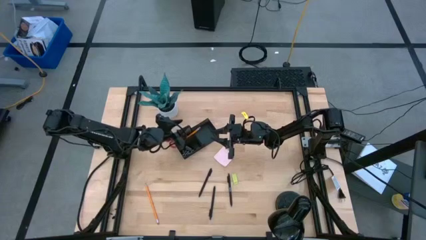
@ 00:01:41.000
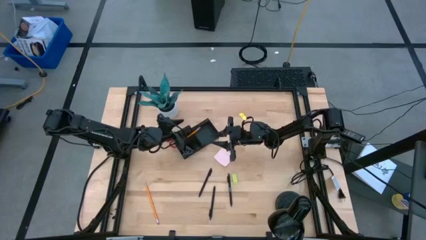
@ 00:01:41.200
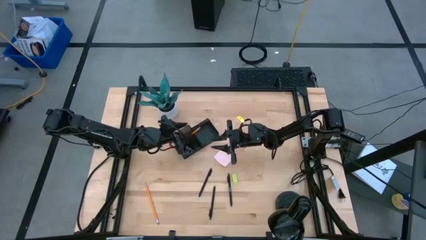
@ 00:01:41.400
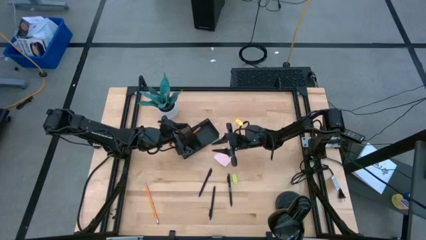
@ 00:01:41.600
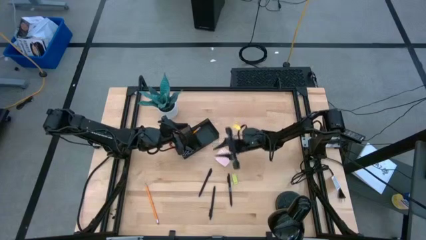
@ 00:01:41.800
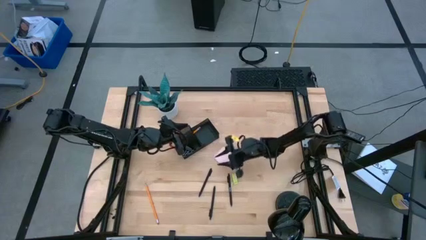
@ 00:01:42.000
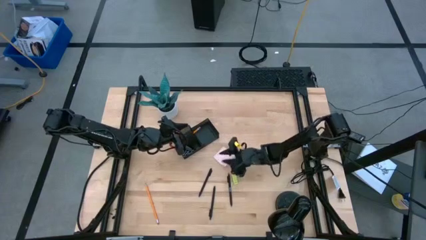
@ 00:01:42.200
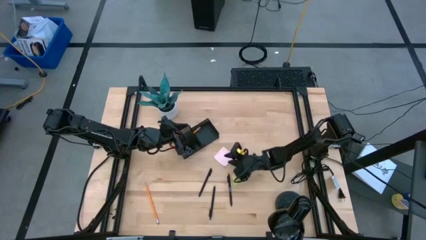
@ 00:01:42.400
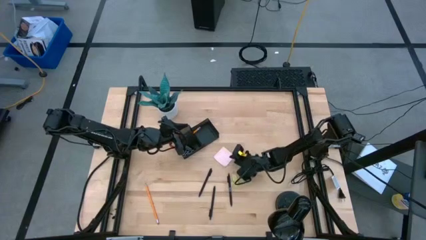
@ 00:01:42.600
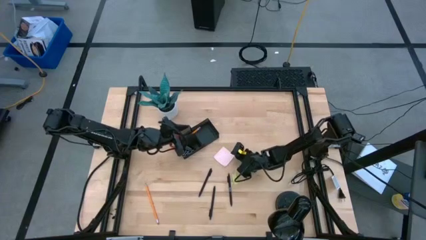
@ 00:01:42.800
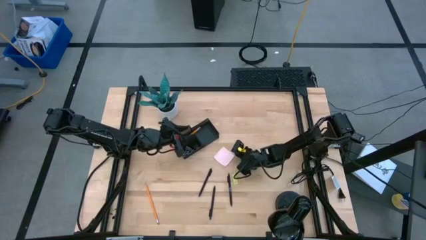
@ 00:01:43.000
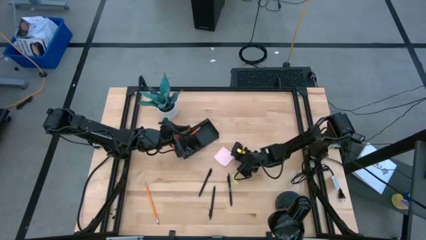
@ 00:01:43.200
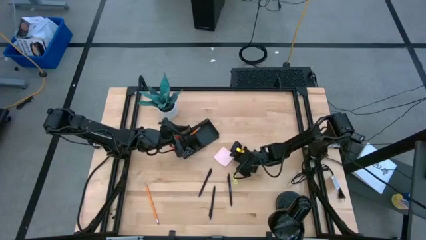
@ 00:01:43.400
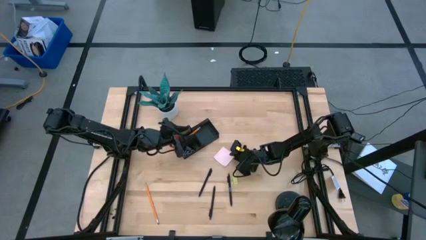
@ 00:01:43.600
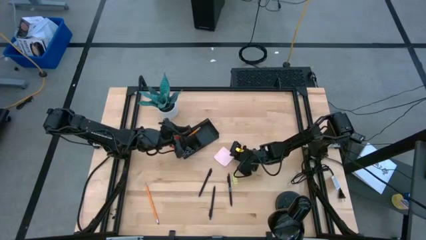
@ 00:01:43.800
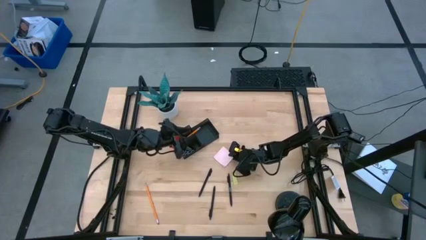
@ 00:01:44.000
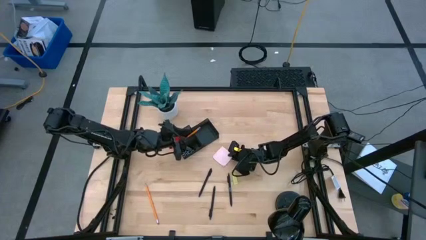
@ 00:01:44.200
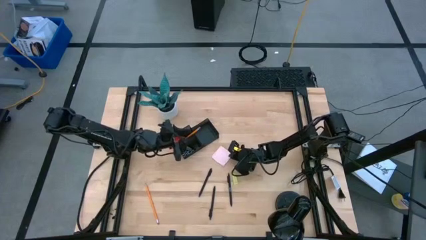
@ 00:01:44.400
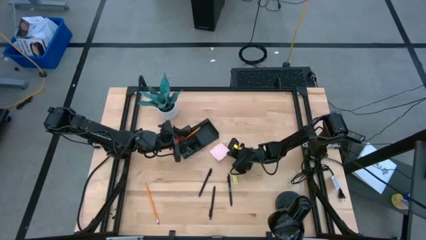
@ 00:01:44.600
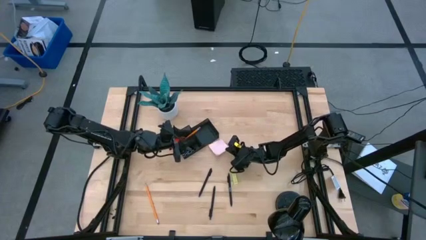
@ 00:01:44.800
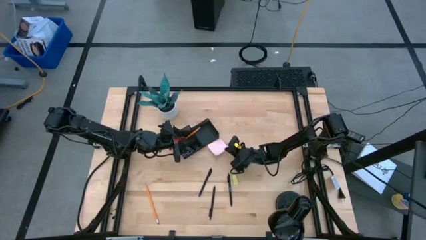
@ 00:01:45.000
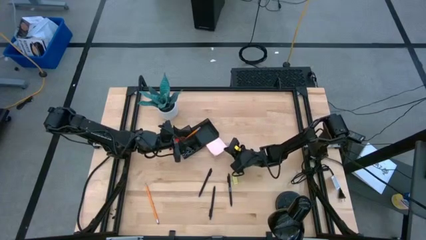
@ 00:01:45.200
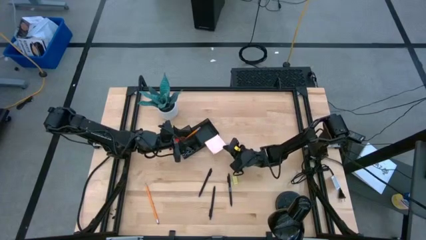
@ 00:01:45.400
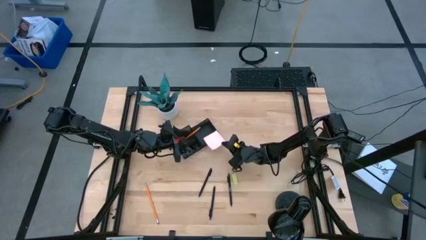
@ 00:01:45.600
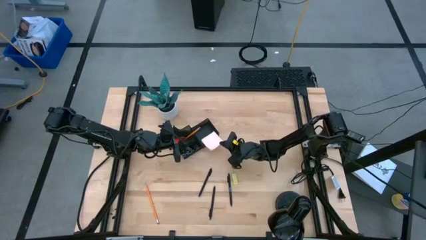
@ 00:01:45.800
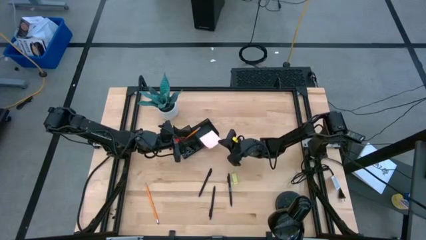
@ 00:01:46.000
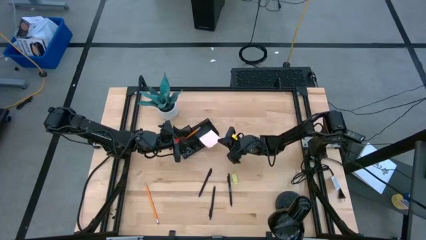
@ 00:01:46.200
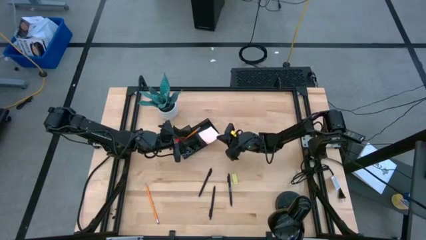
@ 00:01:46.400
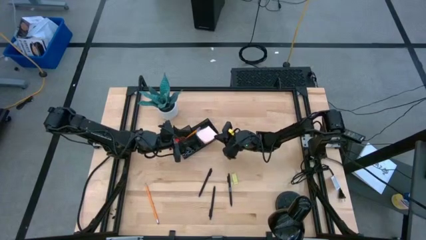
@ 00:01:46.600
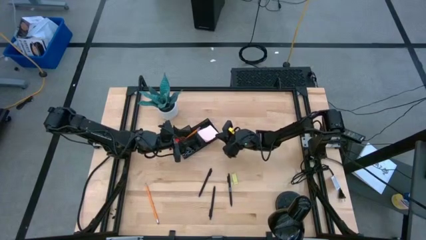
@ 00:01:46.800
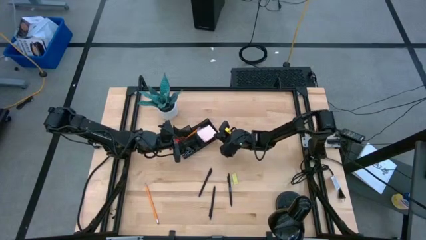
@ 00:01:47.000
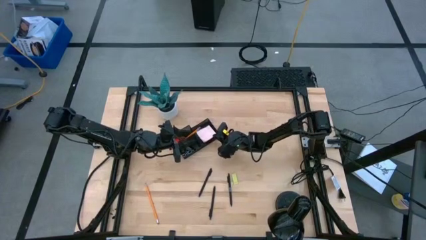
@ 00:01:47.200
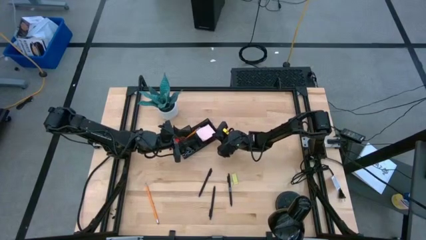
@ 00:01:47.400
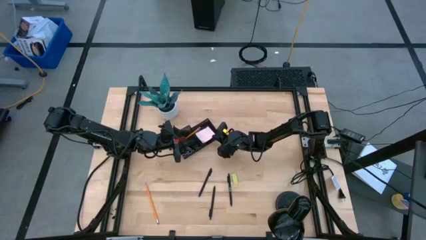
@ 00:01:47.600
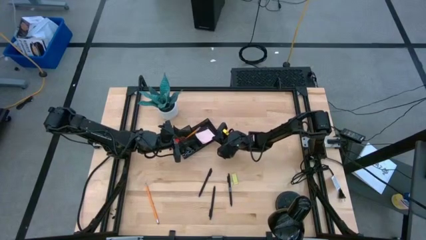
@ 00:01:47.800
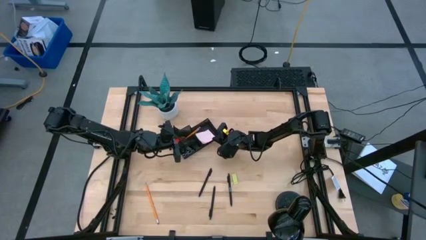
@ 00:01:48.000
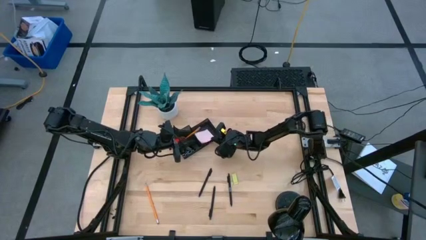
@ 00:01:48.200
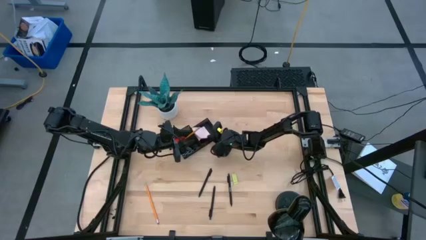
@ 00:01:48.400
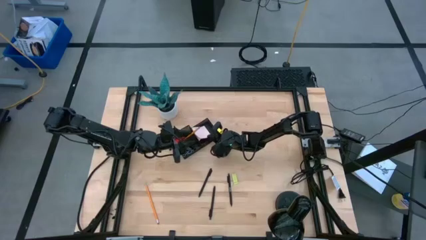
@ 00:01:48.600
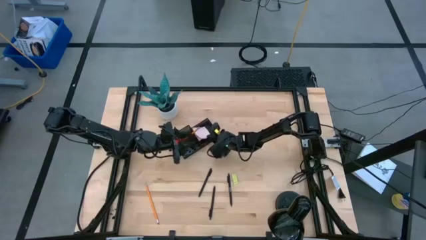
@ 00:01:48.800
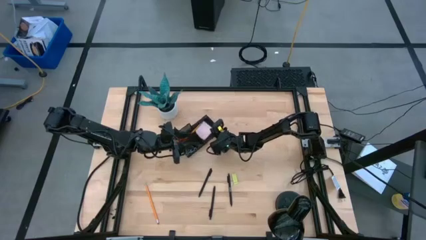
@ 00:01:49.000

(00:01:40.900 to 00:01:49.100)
Task: Pick and place office supplies into organizer
Put the pink sticky note into the black desk organizer

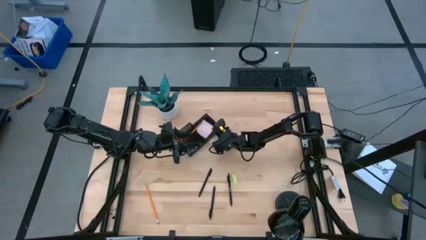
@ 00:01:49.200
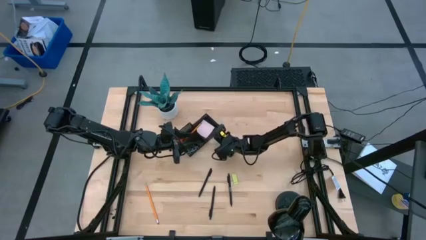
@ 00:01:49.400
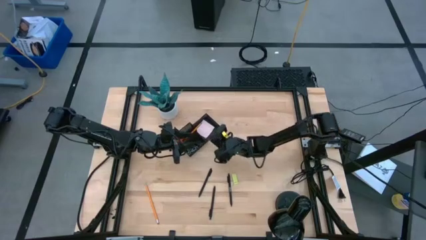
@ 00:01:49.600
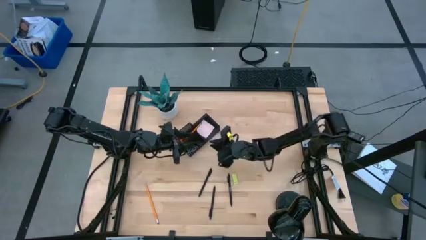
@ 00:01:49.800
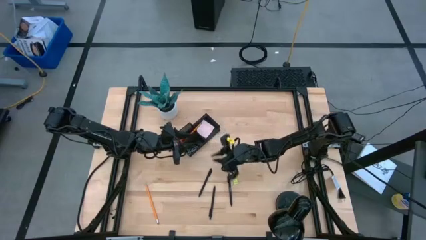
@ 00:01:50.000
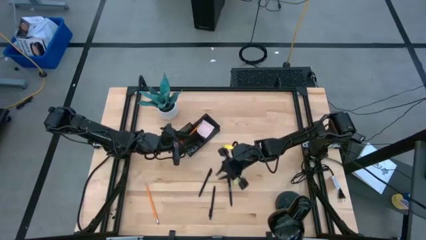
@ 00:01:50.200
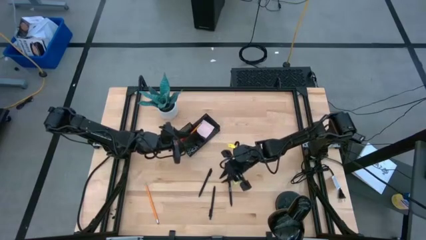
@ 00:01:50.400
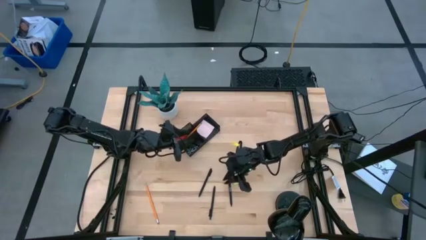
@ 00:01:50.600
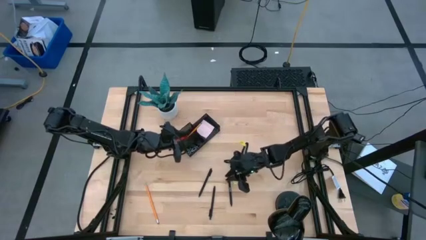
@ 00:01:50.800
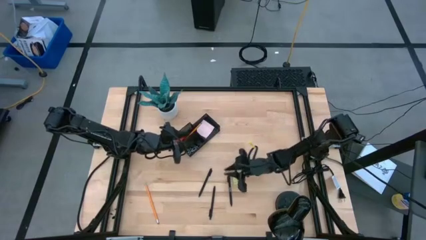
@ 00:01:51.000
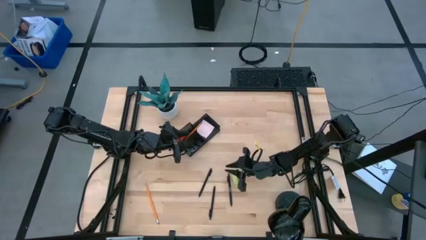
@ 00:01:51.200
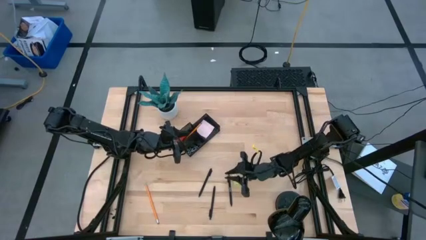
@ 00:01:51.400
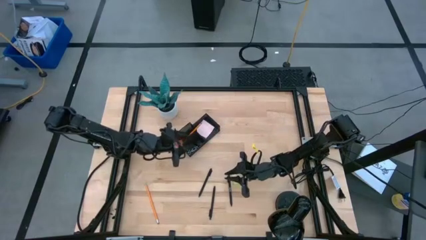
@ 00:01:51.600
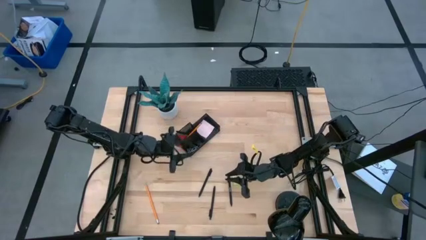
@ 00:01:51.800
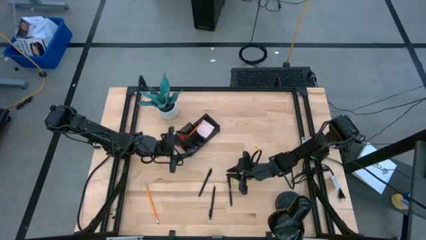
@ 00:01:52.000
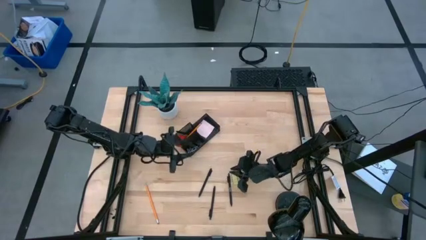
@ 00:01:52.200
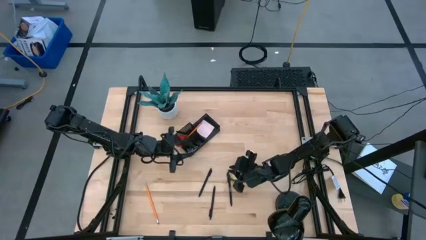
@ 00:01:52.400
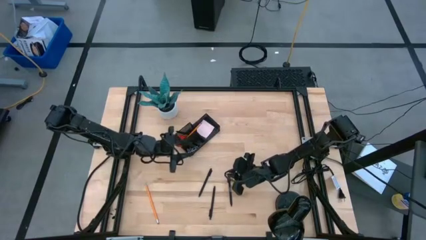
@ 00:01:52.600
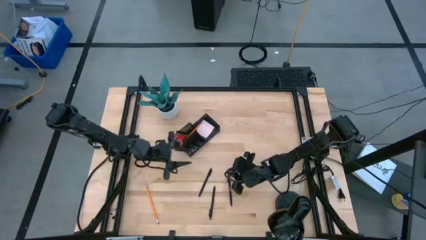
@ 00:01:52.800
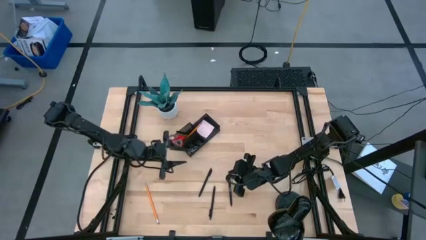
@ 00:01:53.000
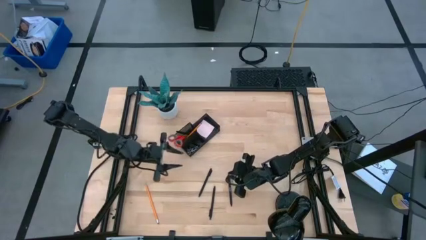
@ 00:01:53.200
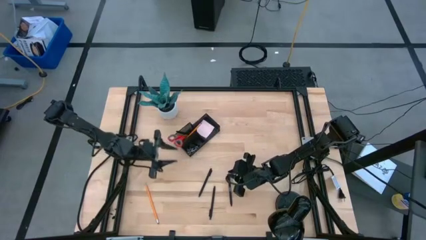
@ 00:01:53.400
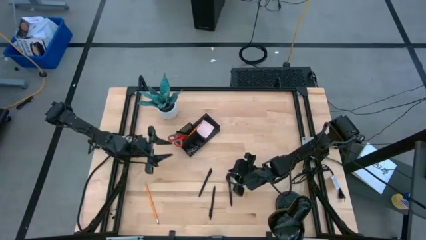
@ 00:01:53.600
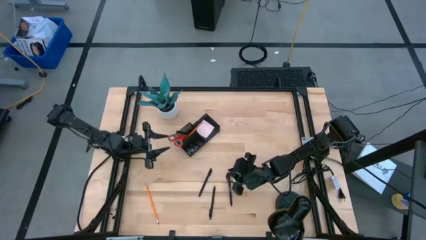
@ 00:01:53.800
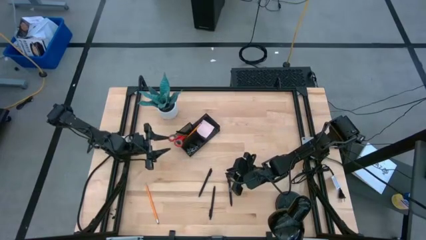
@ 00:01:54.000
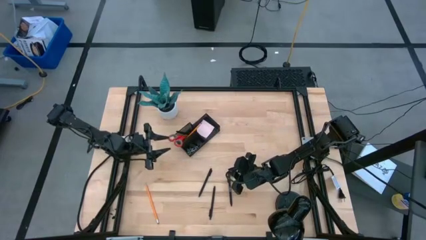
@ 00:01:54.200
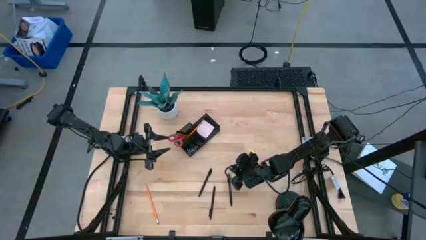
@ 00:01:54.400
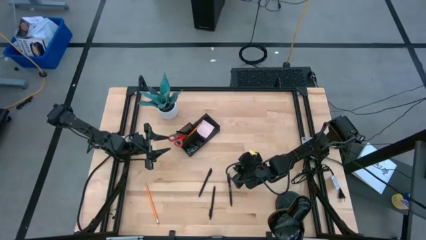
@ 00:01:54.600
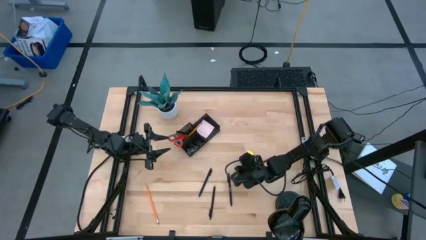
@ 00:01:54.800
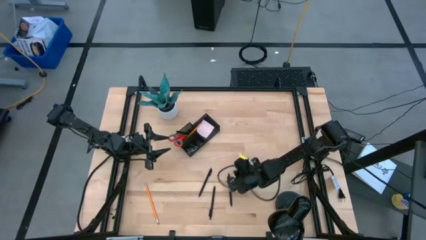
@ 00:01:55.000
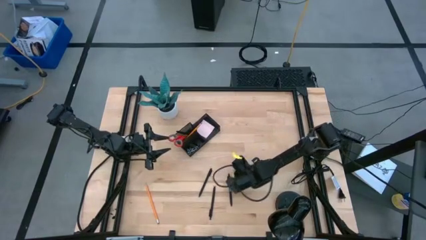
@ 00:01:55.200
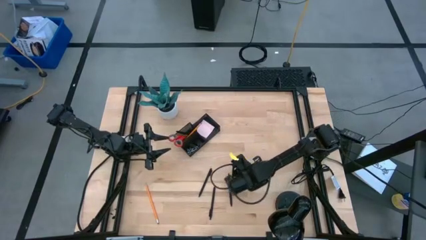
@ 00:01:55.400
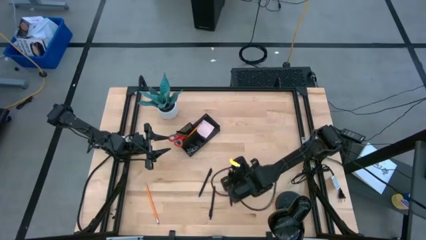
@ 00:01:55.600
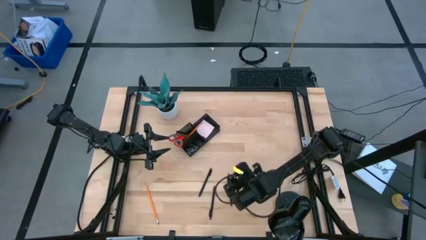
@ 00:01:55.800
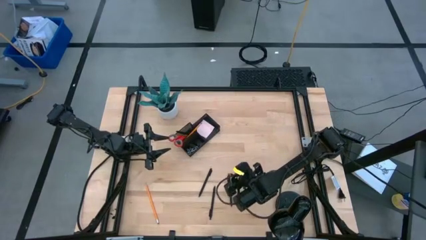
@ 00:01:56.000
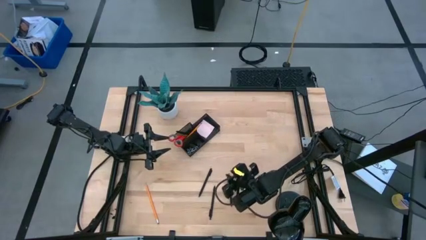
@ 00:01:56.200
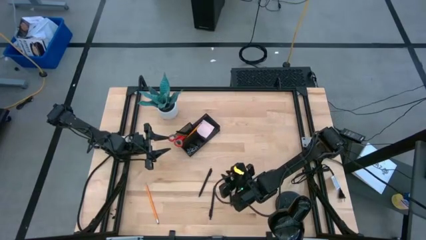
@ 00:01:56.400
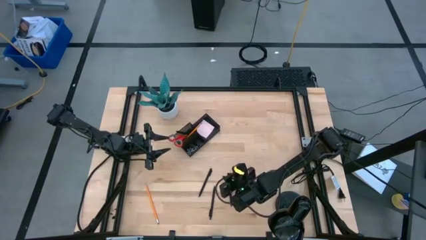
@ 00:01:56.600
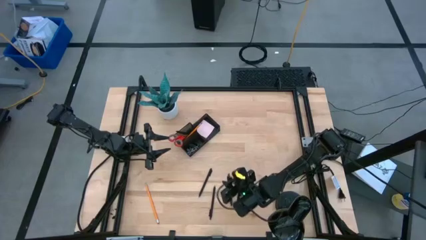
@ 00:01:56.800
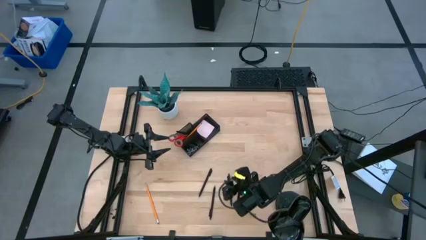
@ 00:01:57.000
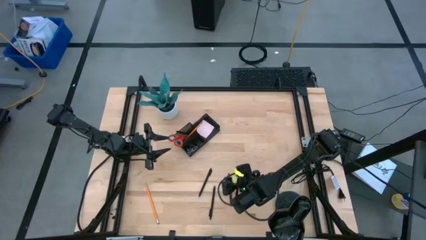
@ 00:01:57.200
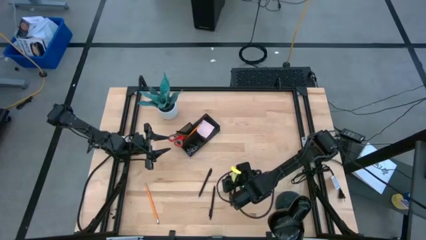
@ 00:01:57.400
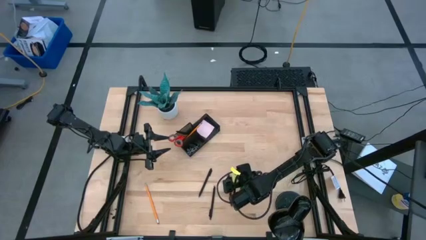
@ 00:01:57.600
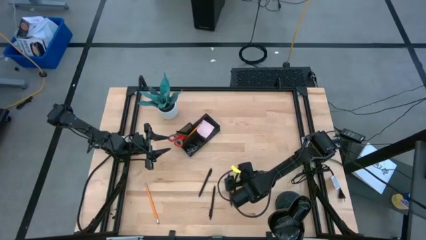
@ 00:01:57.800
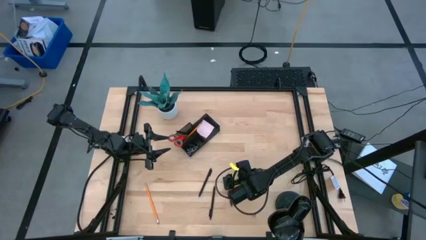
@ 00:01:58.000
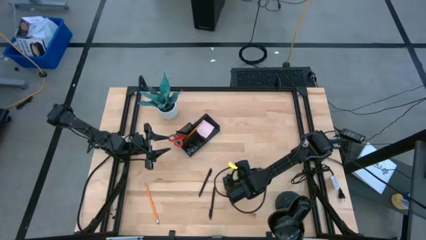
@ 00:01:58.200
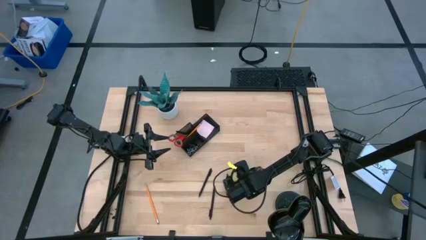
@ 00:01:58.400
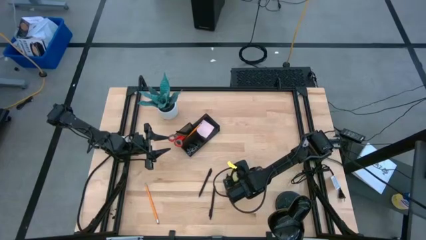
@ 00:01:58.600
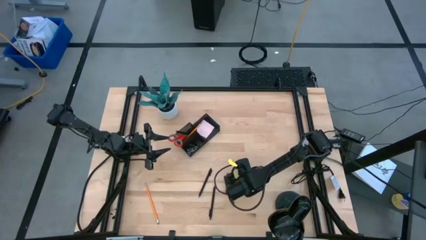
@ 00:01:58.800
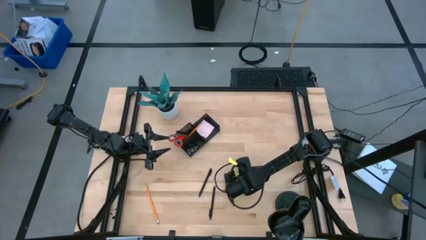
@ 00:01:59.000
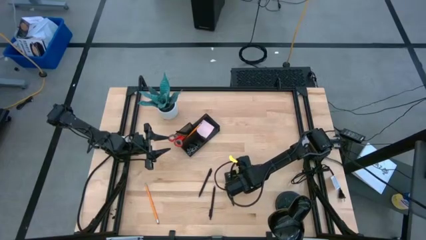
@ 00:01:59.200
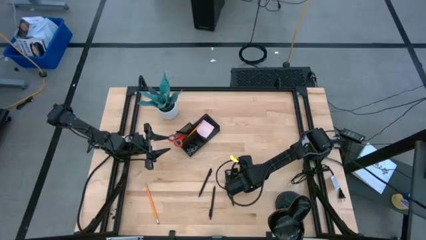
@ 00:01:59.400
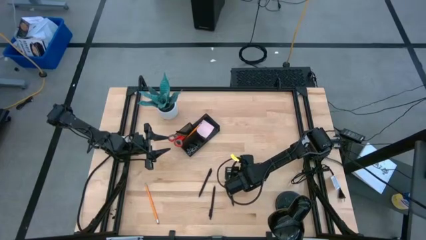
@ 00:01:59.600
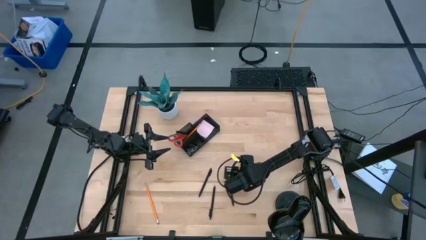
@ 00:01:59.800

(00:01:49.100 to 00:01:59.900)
Put the green eraser into the black desk organizer
